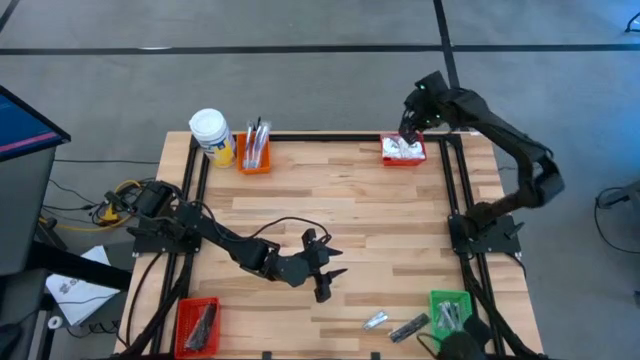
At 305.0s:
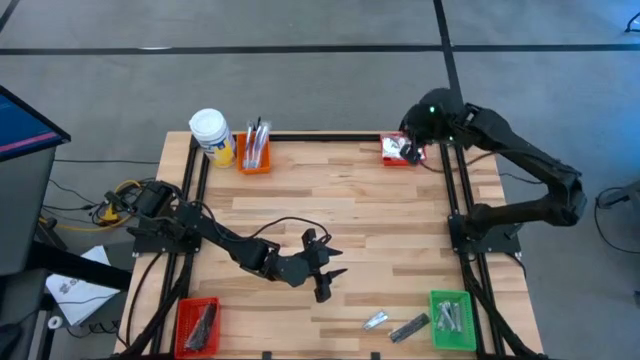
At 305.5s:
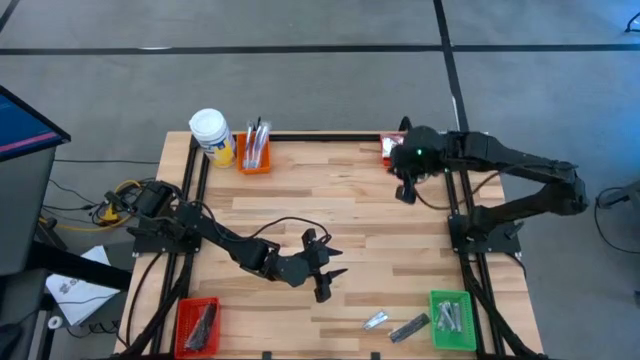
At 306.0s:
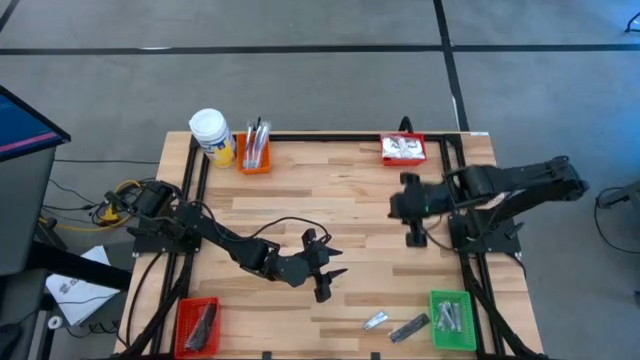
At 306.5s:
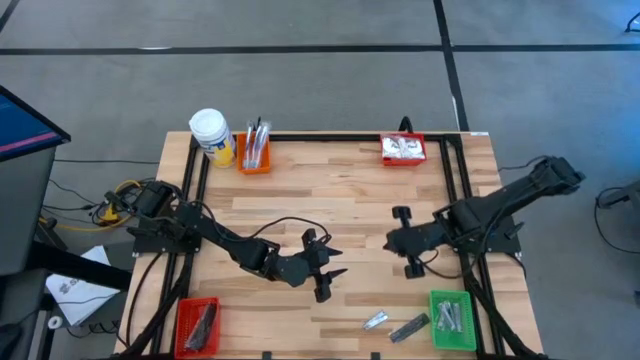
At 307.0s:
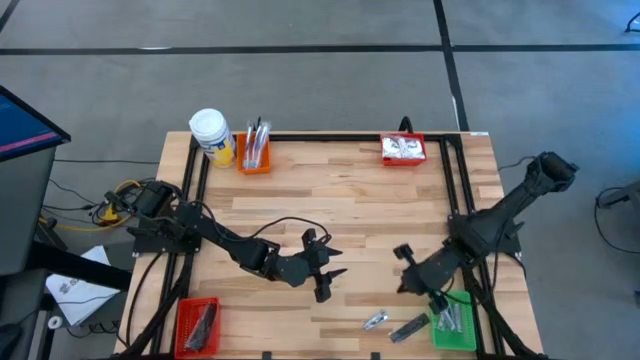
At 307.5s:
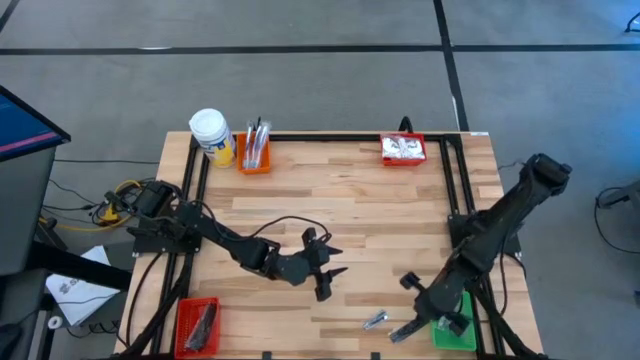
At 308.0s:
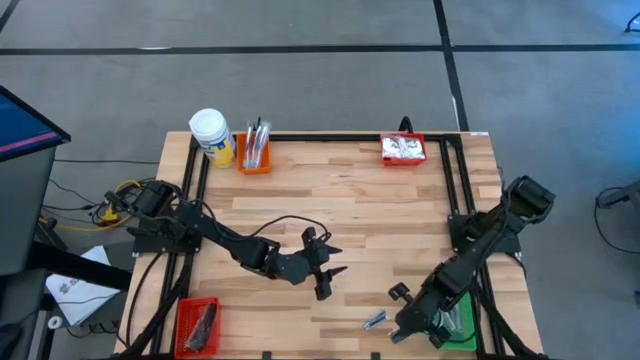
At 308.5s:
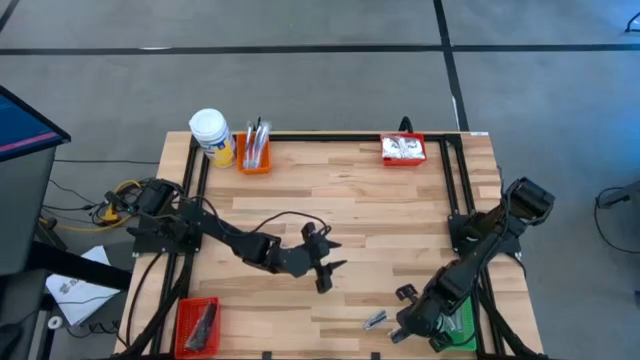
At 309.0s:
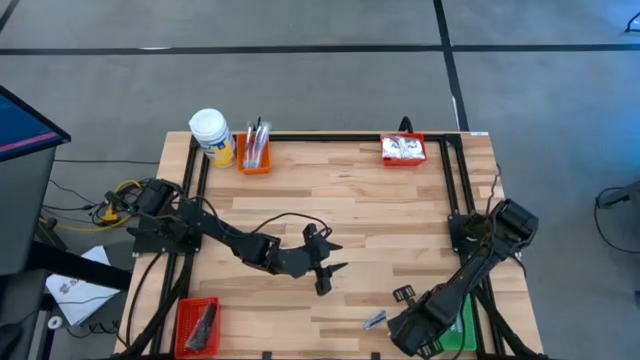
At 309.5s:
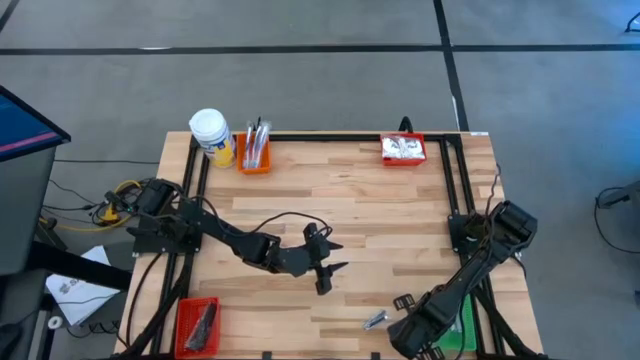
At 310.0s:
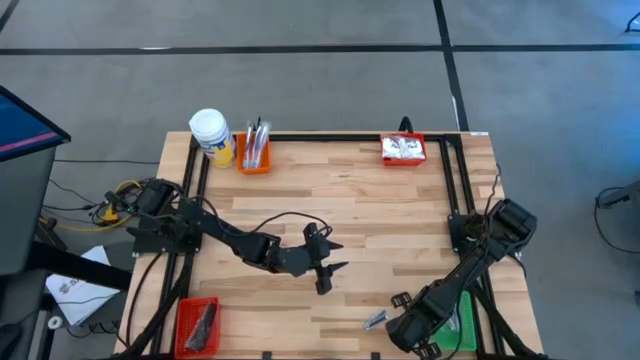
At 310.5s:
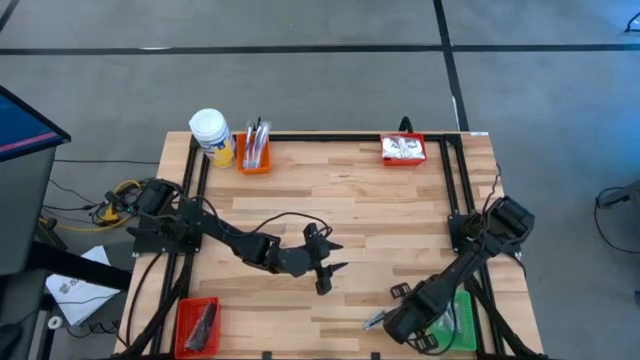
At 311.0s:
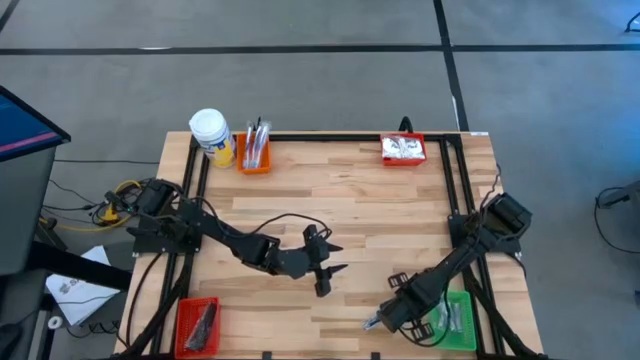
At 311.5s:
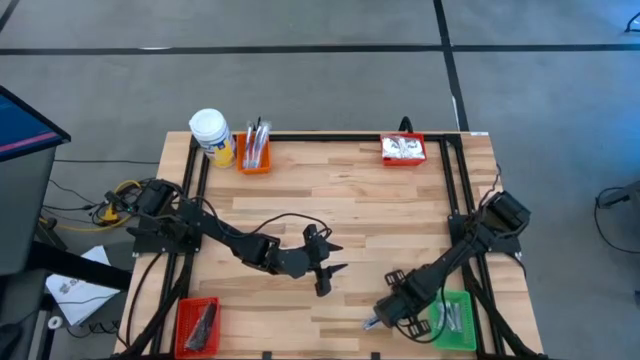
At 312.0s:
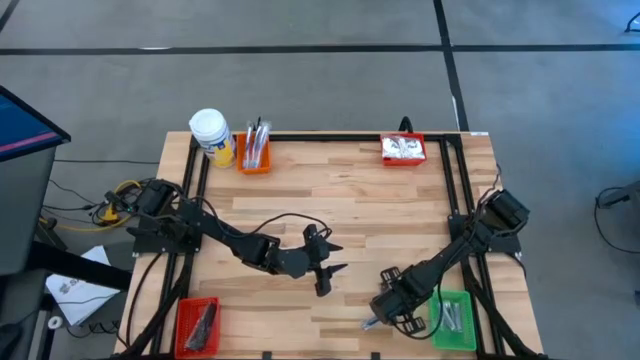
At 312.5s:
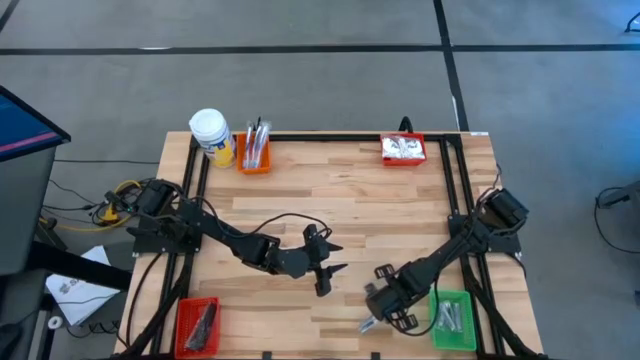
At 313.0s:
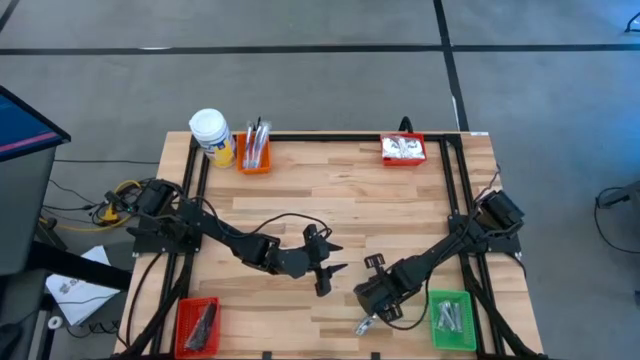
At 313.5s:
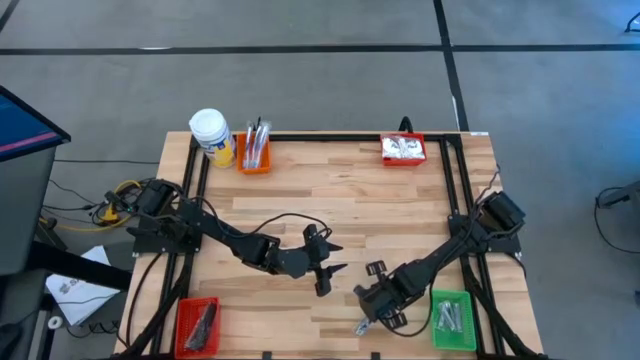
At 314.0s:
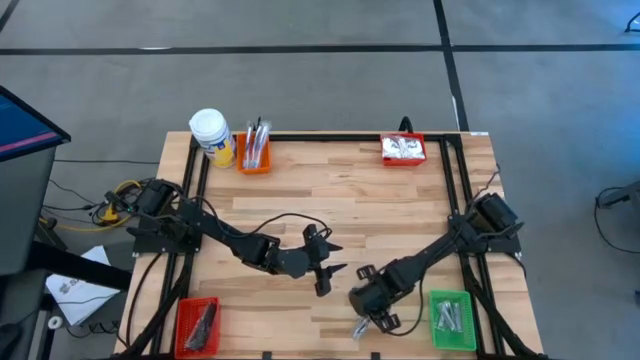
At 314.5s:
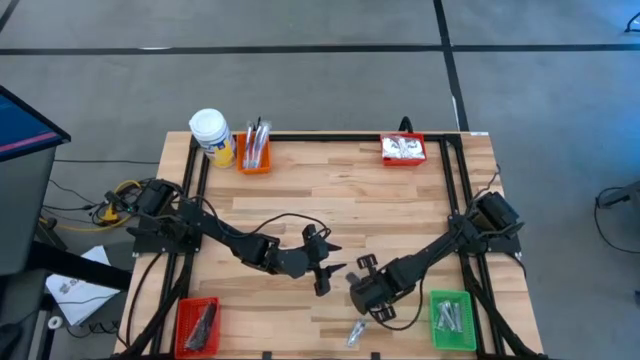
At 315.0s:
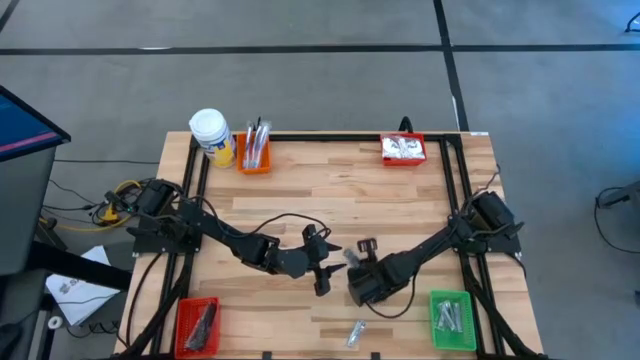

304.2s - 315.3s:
Task: Pick & Place Travel size toiletries
Move the comb to the center of the table

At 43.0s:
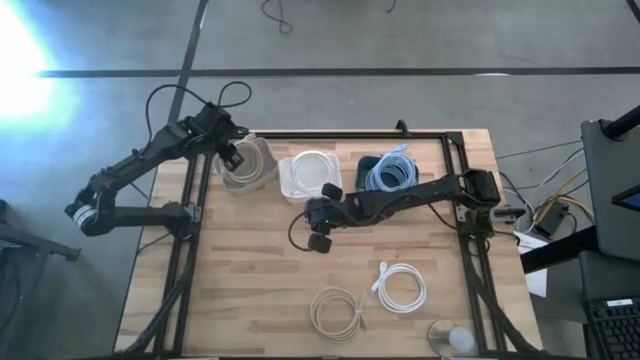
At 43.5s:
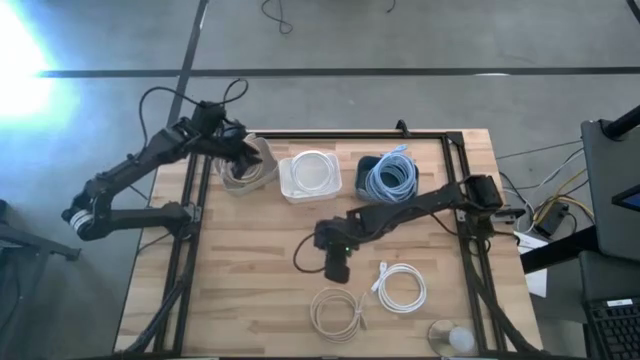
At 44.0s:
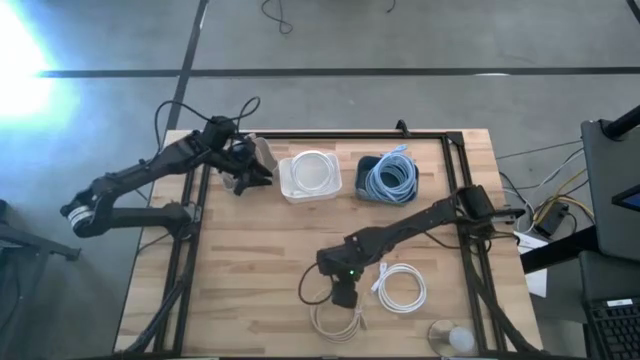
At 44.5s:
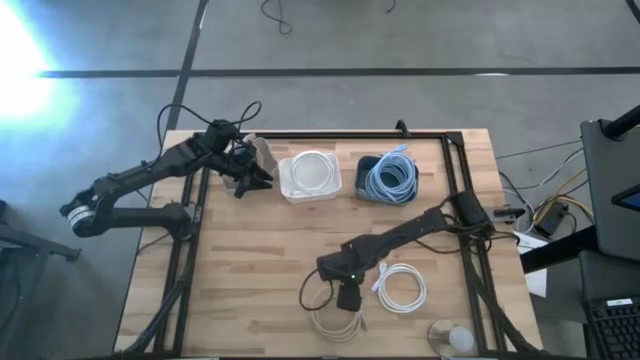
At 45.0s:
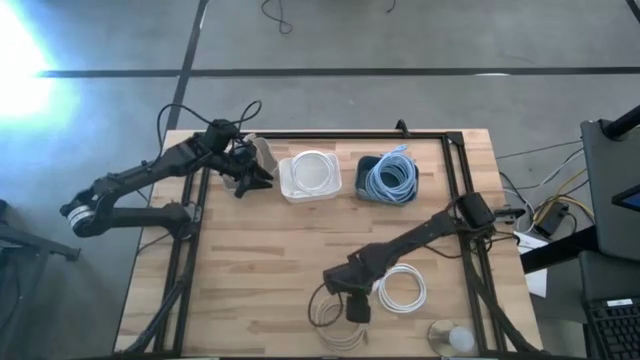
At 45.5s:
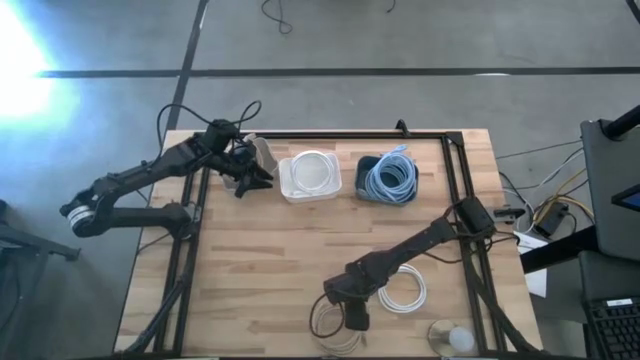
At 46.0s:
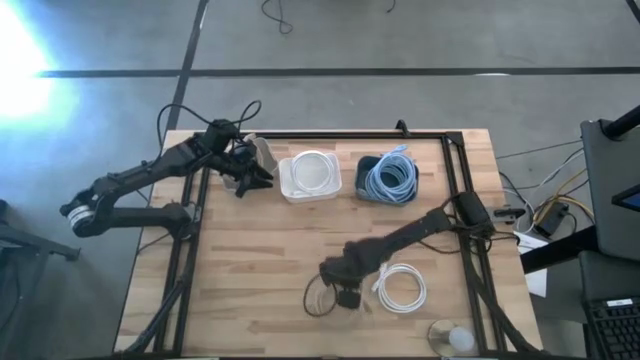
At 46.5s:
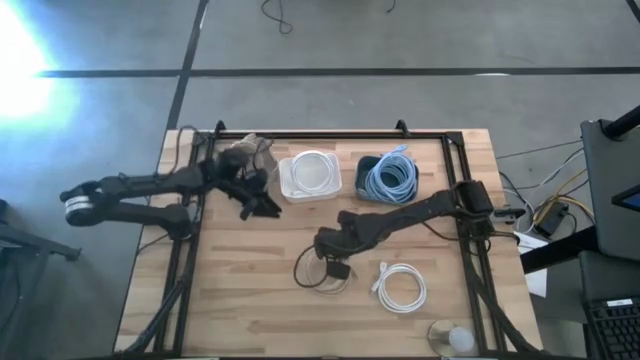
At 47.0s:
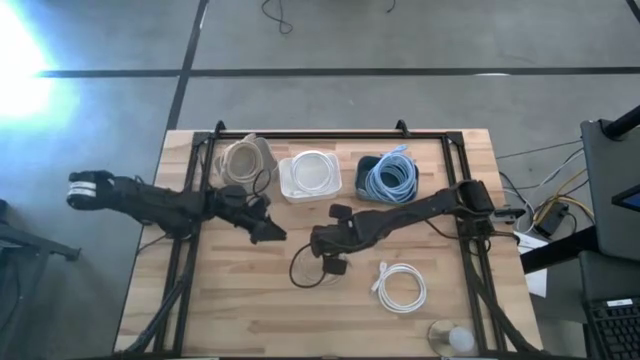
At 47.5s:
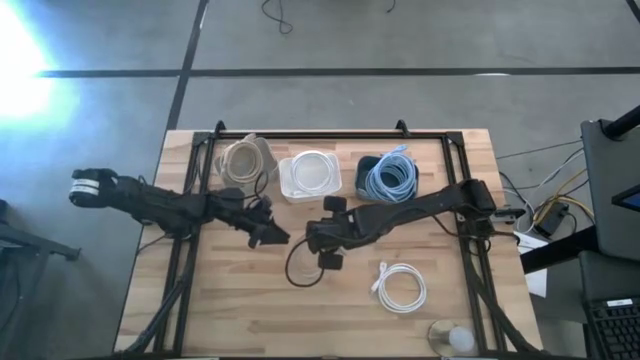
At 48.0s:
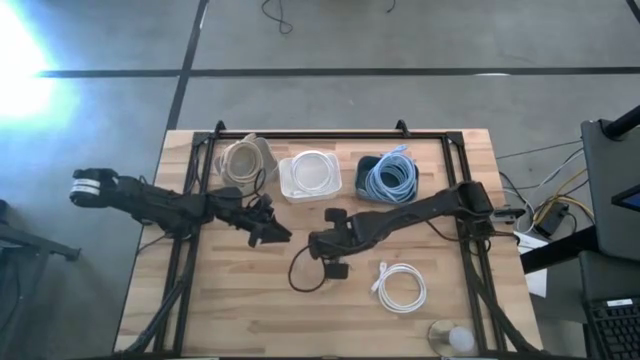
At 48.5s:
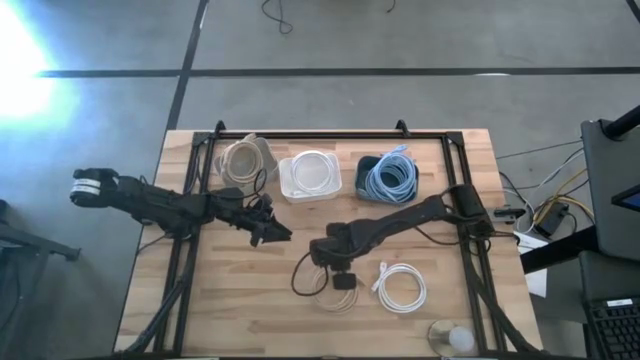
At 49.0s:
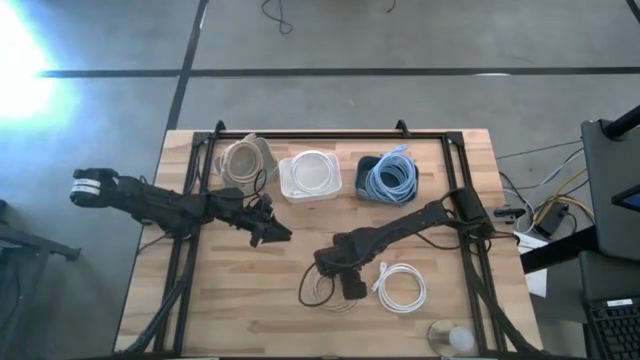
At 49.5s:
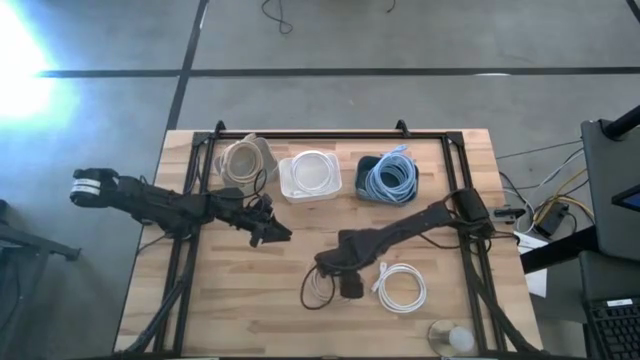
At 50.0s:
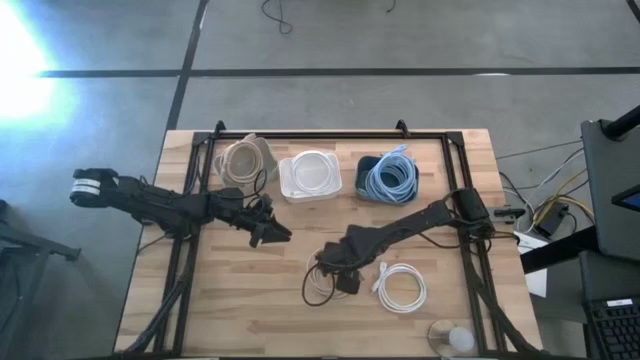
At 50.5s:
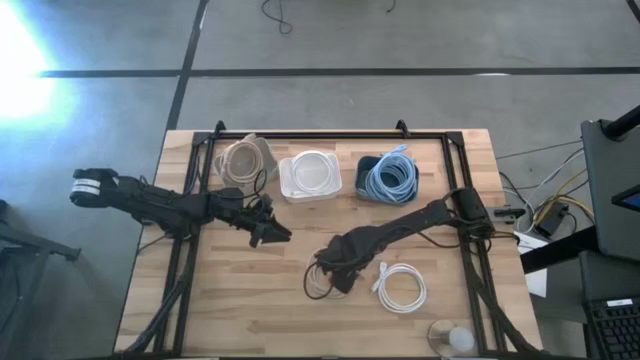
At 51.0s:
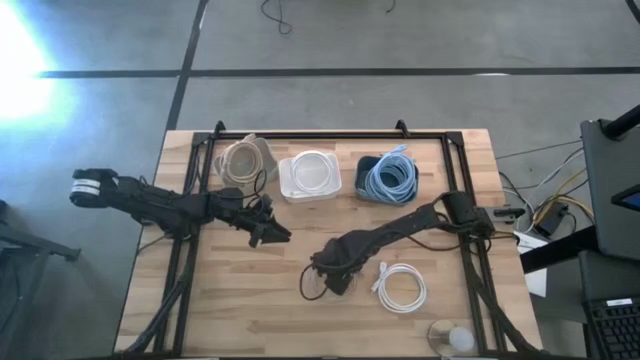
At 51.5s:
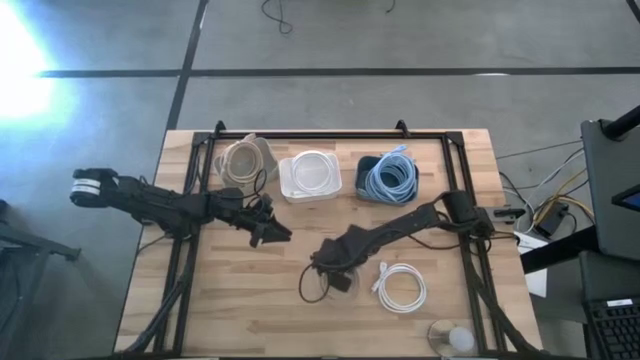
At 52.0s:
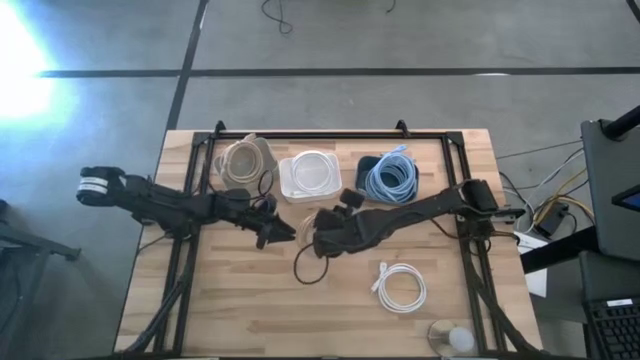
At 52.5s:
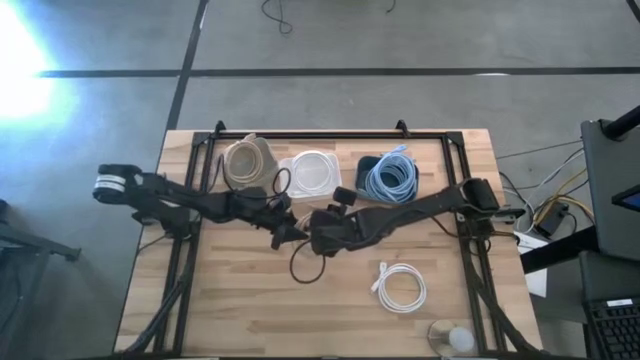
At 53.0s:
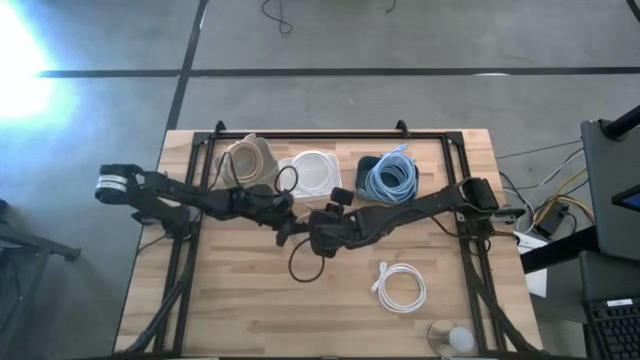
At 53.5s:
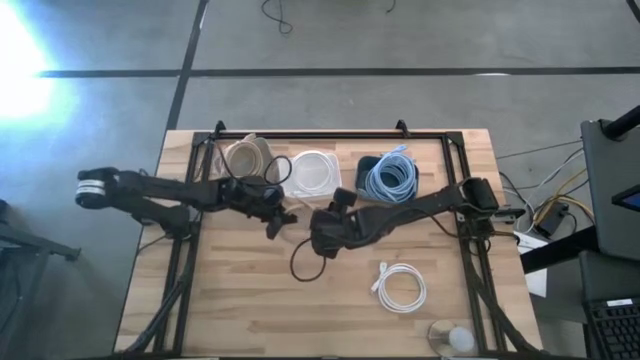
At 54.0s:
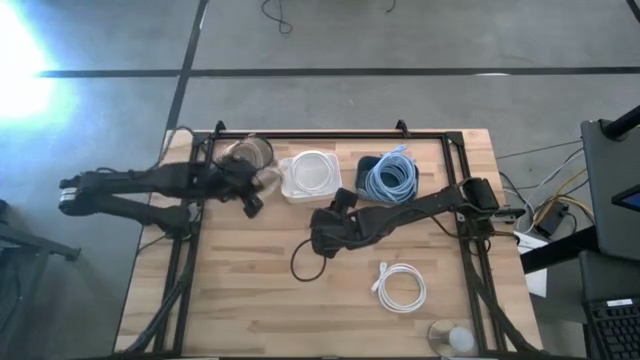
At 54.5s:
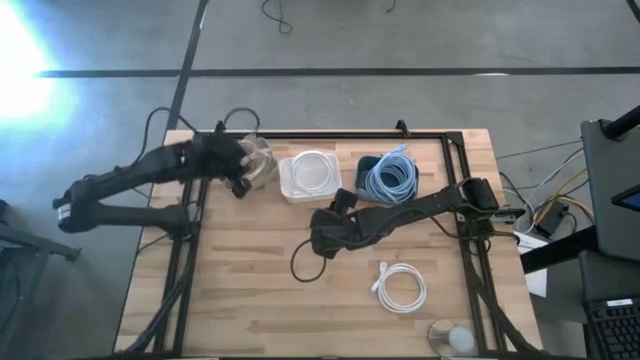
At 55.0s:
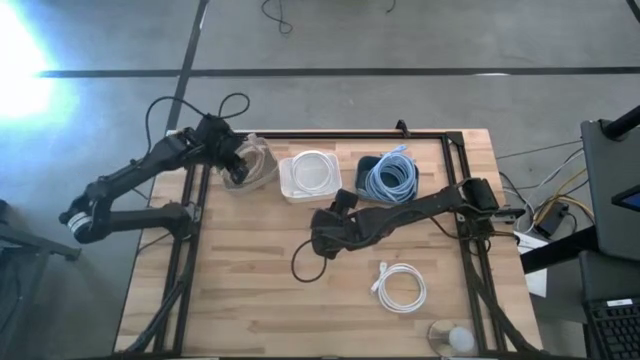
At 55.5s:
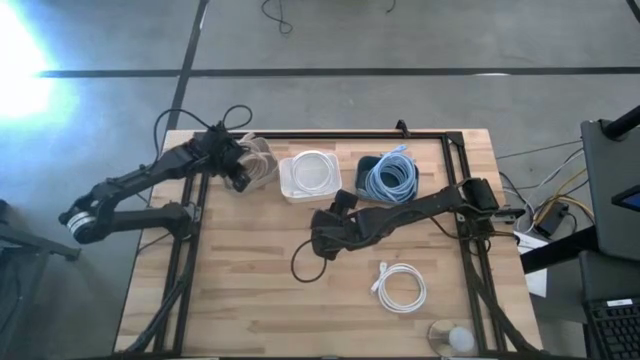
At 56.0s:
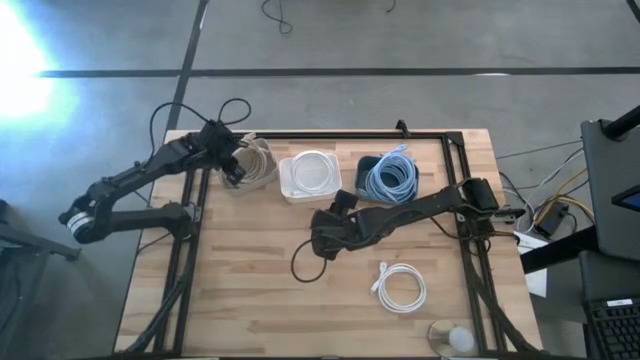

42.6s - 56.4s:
Task: Sort HDMI cables
Put the light brown HDMI cable into the gray bin
